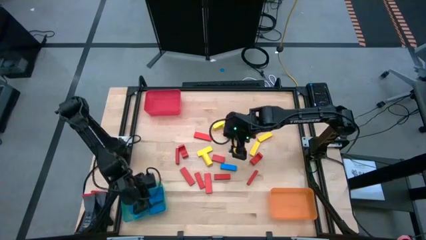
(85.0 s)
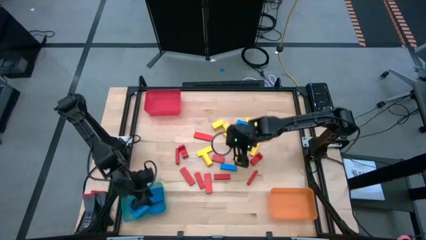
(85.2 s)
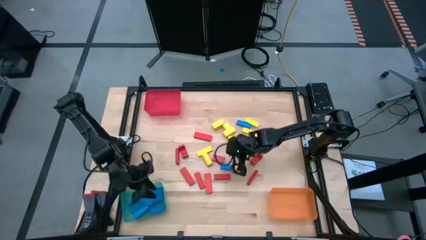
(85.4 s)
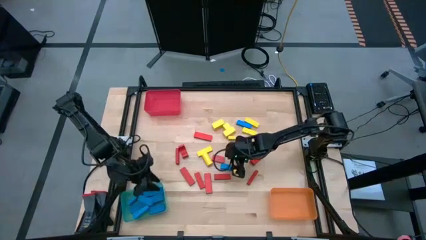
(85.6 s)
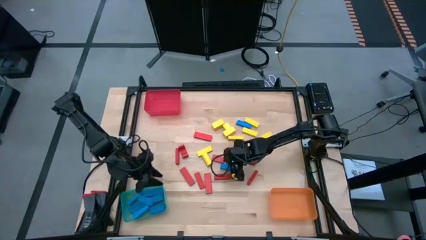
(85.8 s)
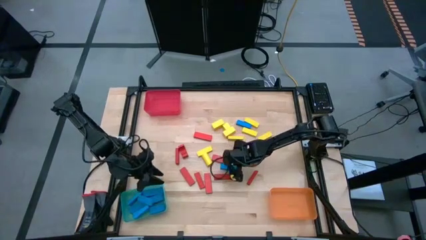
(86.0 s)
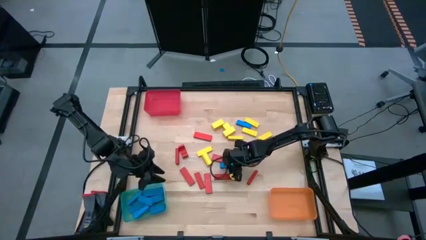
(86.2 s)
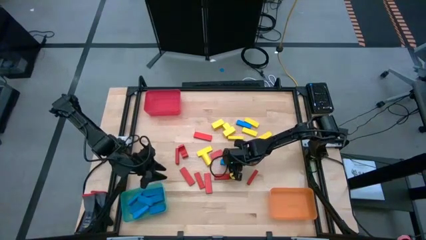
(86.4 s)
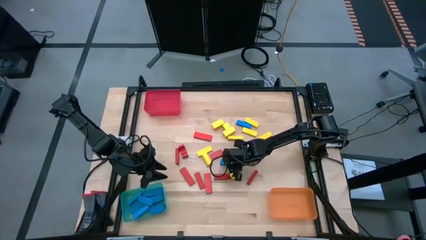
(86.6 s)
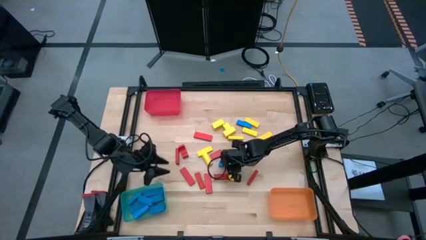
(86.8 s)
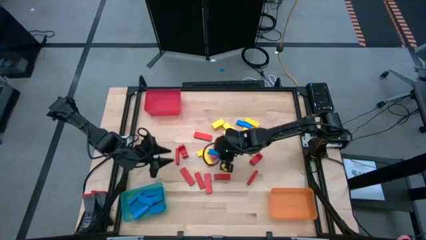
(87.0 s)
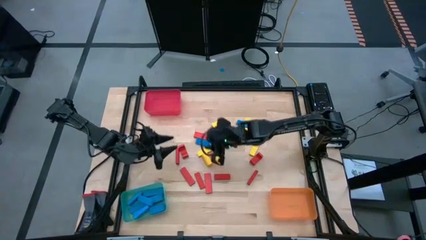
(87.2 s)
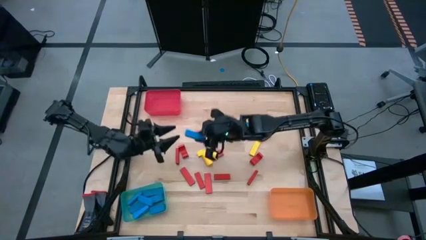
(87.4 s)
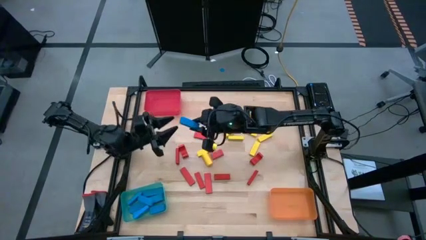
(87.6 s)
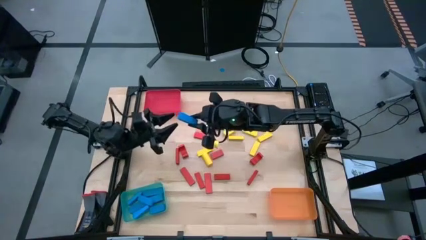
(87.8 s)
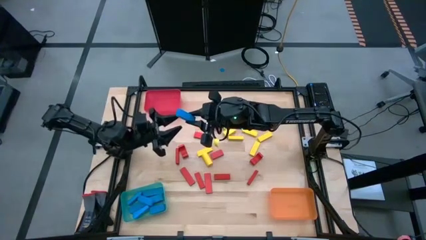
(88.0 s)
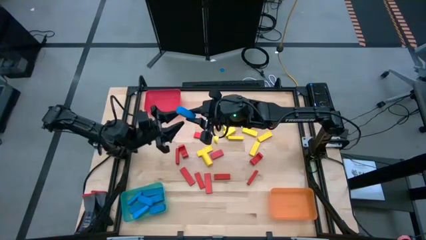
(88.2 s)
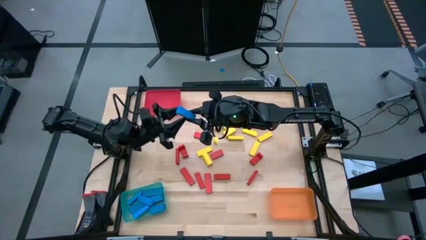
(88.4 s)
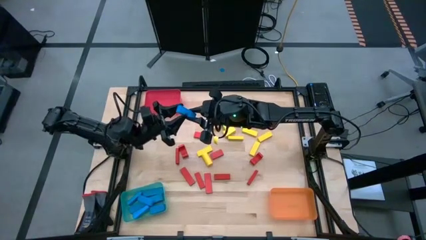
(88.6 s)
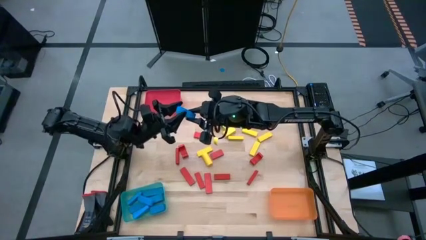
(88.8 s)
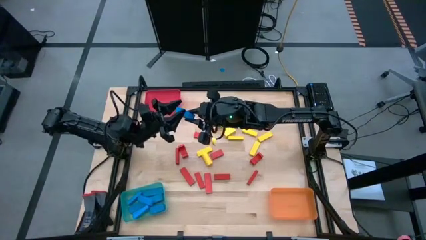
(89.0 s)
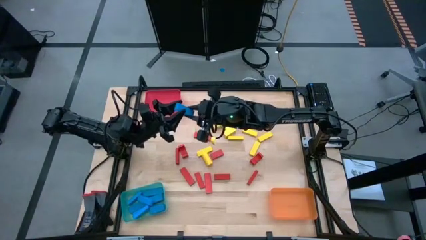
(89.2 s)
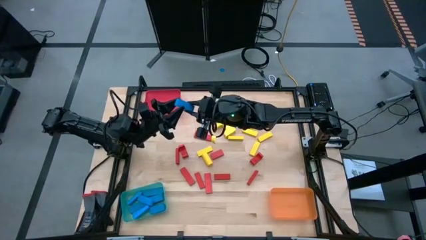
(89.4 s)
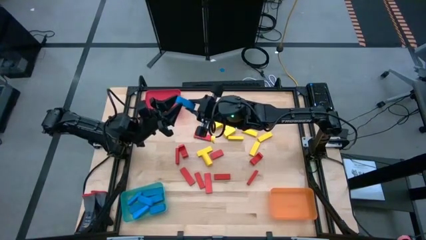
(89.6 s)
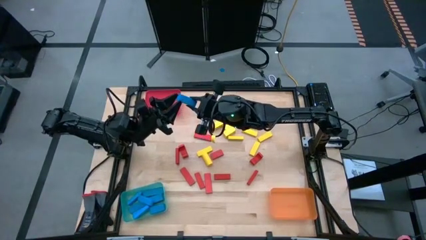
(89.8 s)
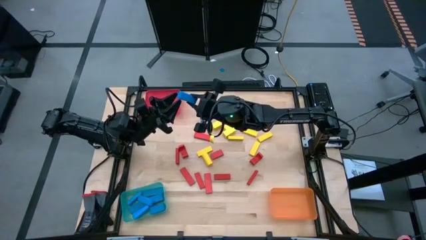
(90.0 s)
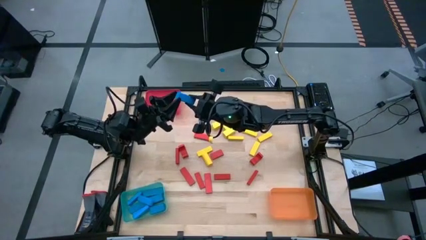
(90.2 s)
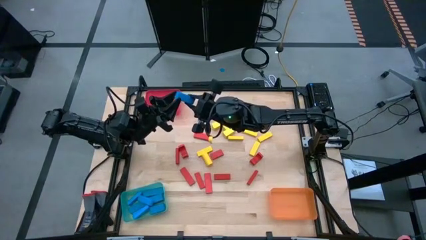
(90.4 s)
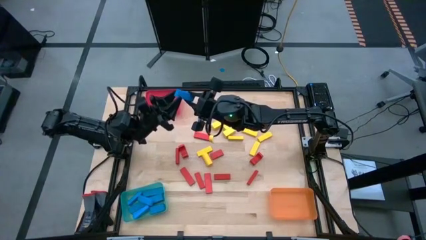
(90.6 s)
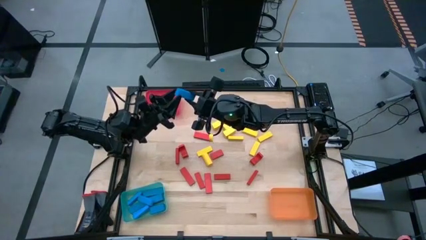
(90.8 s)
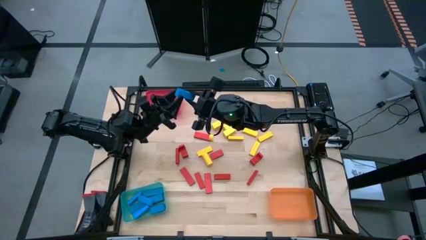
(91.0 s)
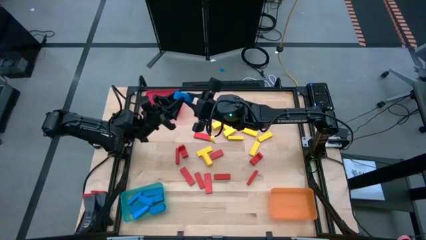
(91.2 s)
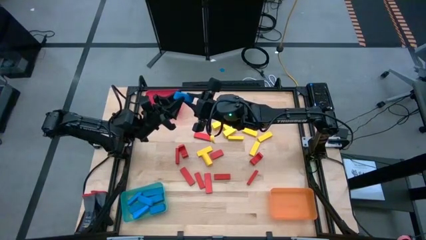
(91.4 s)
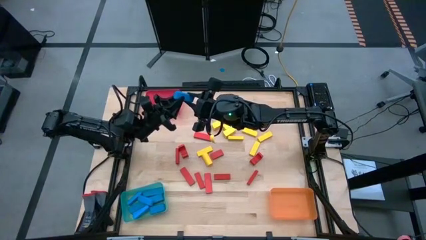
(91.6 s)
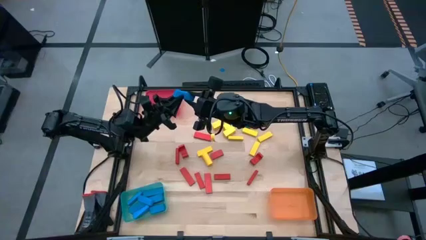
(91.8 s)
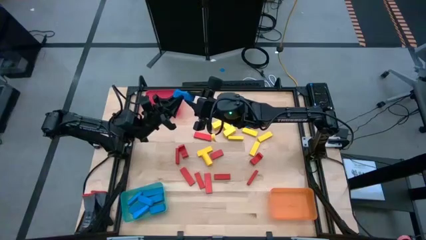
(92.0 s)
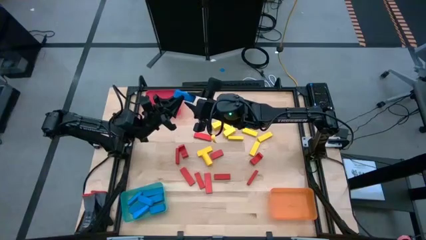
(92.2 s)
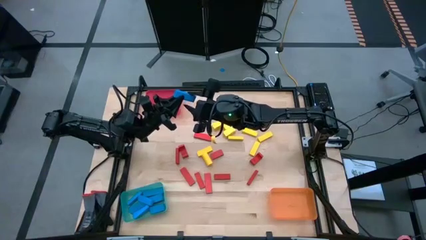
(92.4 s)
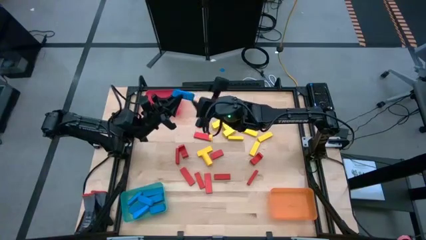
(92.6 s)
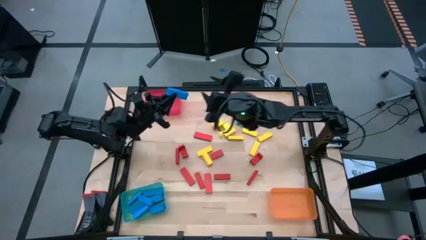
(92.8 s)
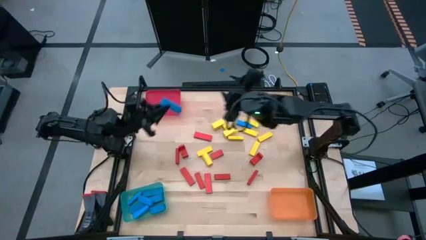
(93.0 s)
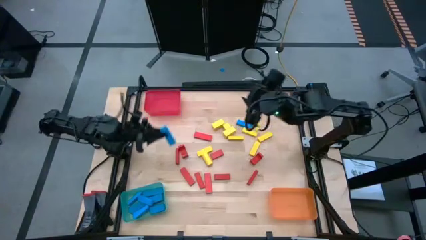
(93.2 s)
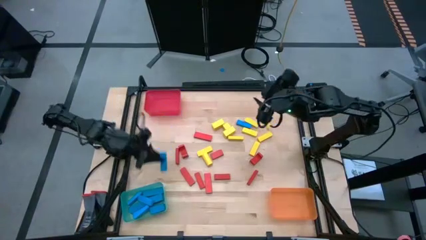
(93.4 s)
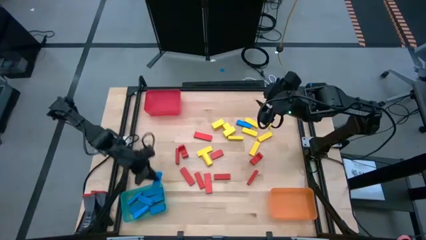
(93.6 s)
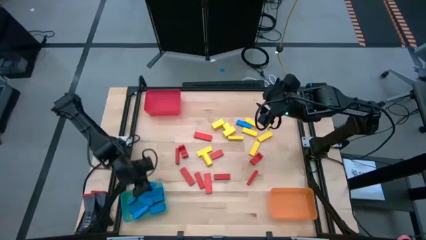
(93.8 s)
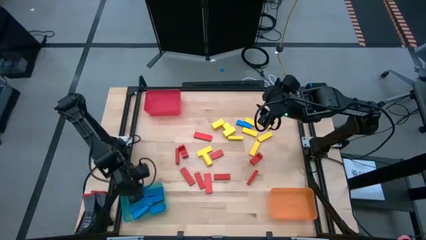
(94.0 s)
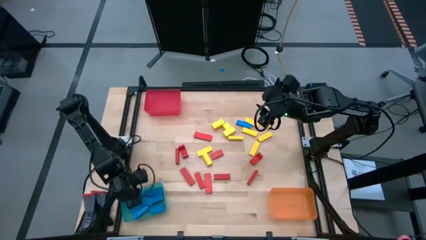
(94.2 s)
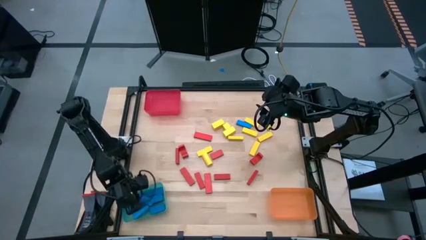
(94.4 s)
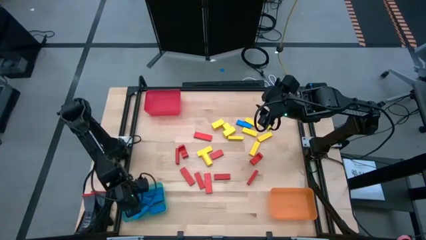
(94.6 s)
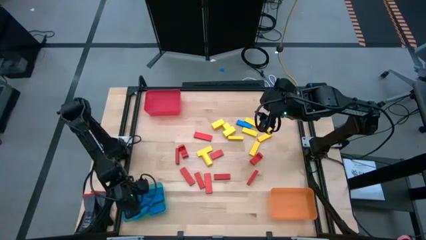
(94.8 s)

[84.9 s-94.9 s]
Task: Sort blocks
Put the blue block into the green bin

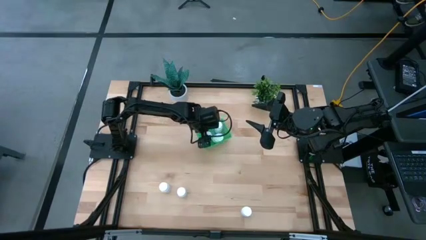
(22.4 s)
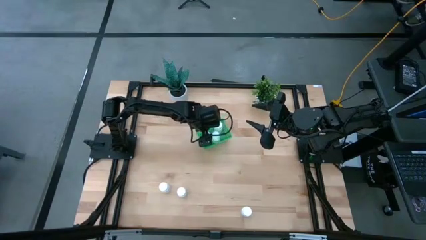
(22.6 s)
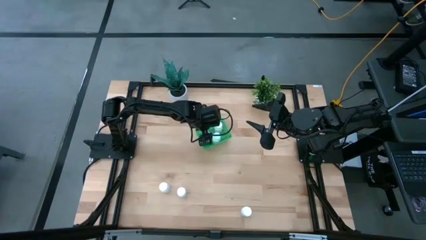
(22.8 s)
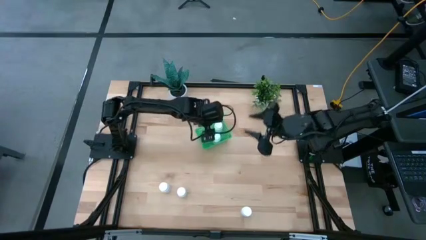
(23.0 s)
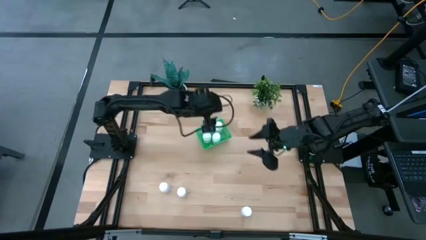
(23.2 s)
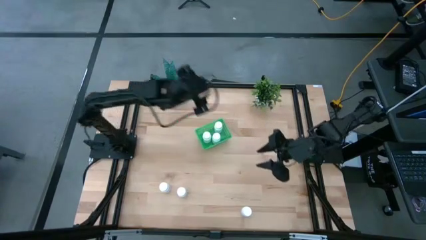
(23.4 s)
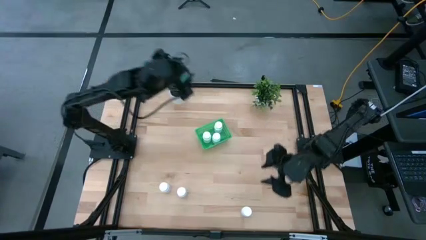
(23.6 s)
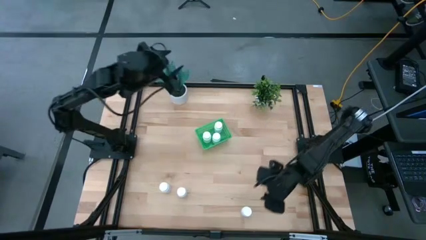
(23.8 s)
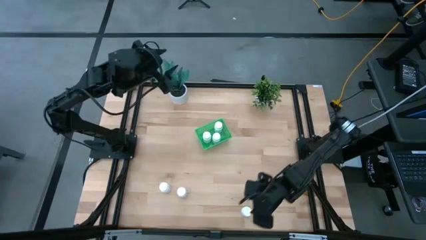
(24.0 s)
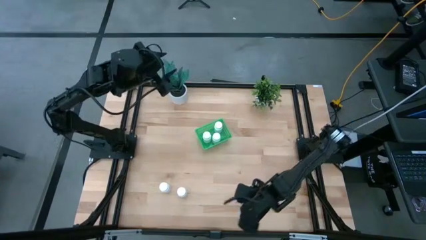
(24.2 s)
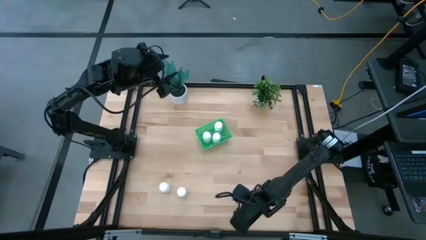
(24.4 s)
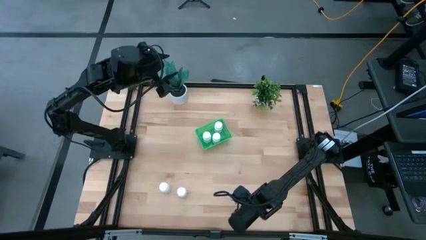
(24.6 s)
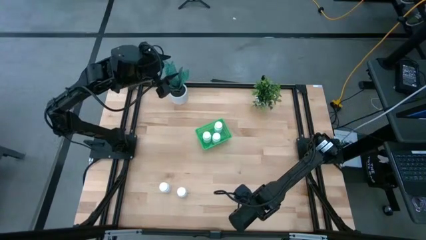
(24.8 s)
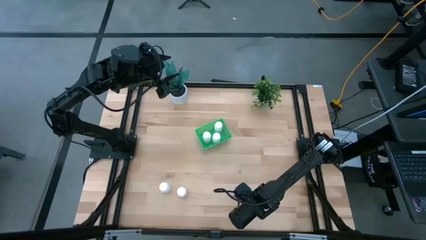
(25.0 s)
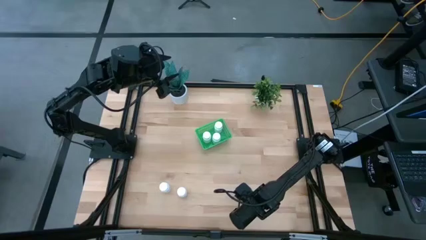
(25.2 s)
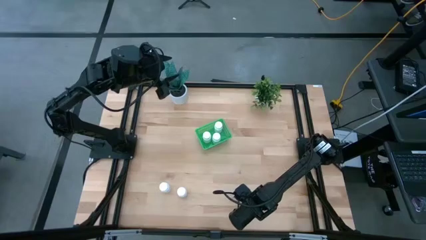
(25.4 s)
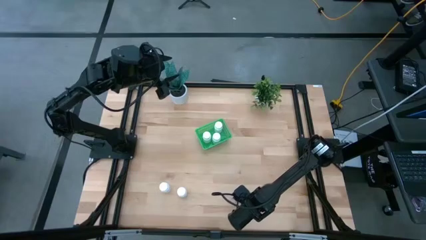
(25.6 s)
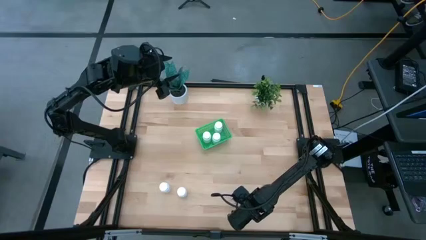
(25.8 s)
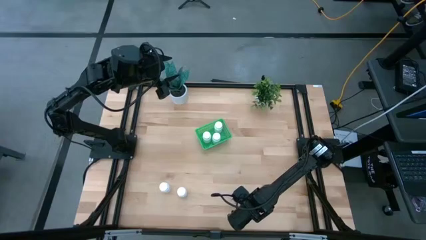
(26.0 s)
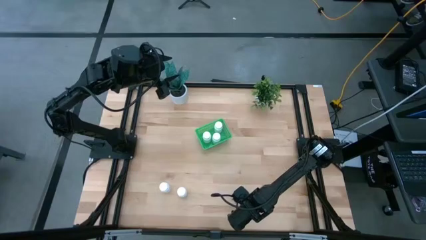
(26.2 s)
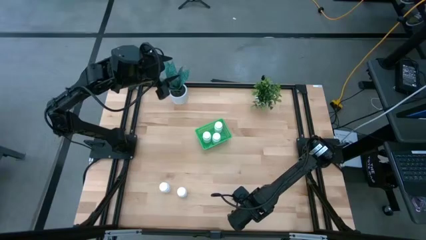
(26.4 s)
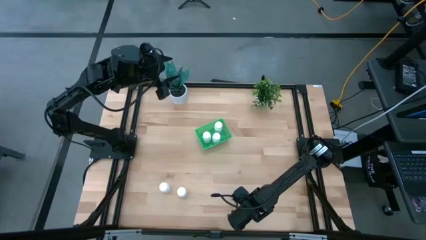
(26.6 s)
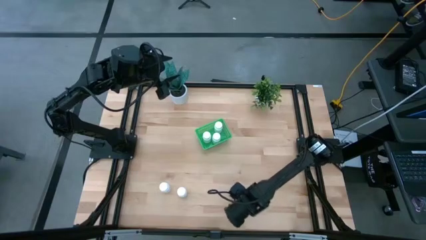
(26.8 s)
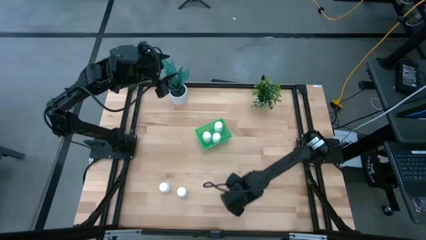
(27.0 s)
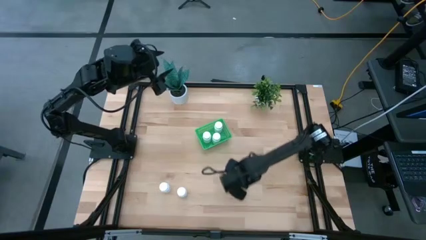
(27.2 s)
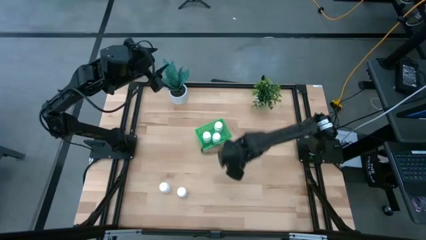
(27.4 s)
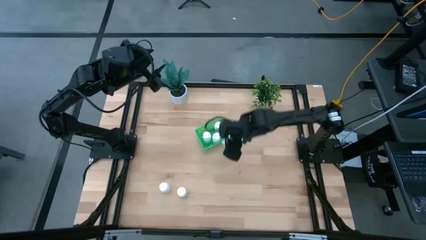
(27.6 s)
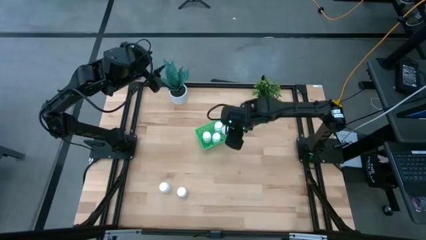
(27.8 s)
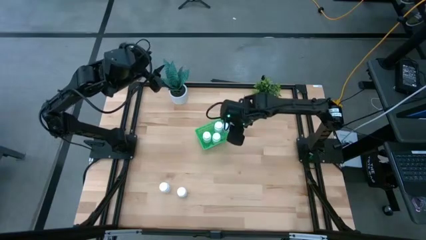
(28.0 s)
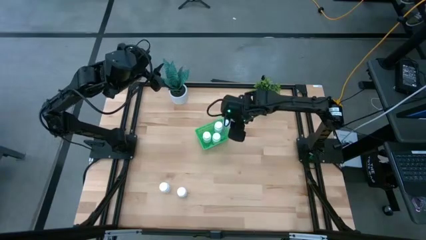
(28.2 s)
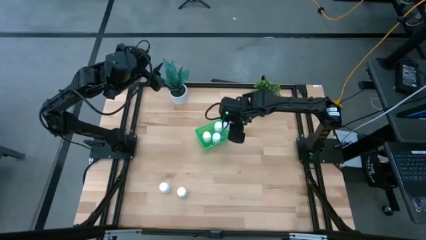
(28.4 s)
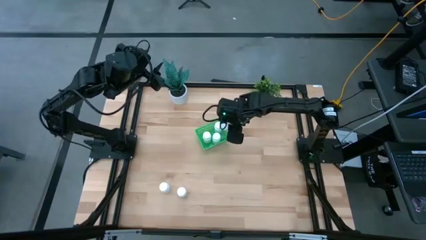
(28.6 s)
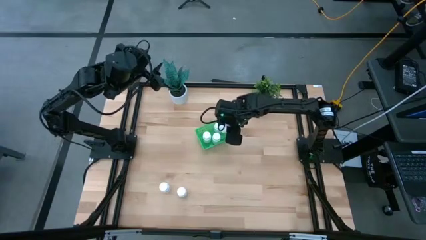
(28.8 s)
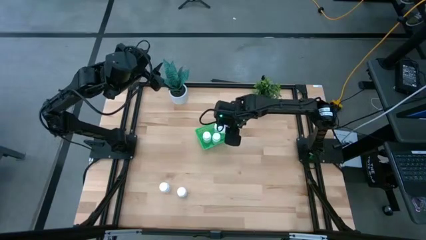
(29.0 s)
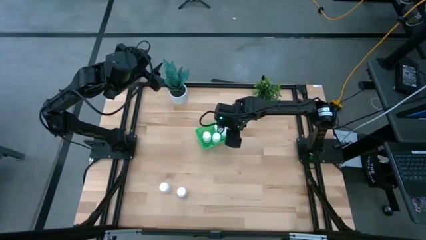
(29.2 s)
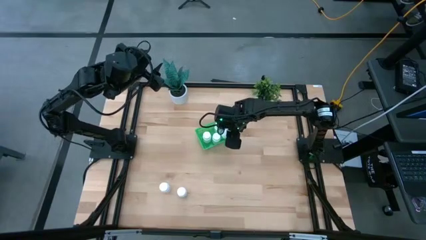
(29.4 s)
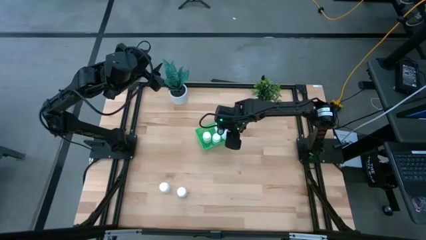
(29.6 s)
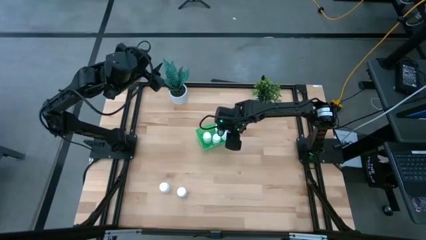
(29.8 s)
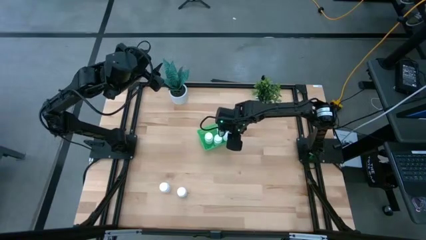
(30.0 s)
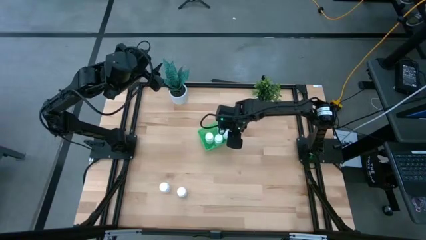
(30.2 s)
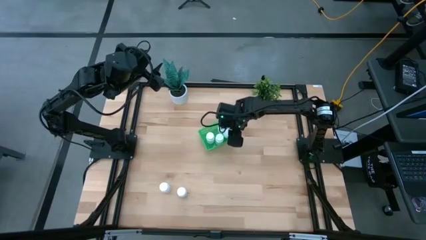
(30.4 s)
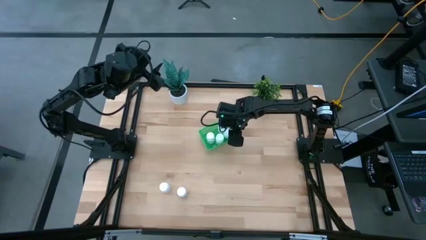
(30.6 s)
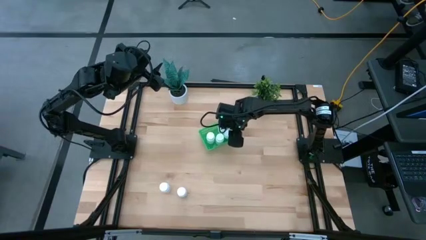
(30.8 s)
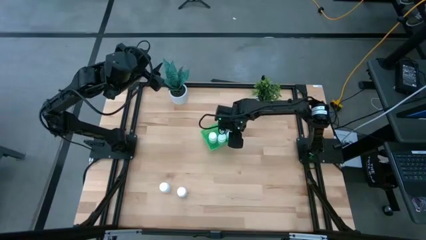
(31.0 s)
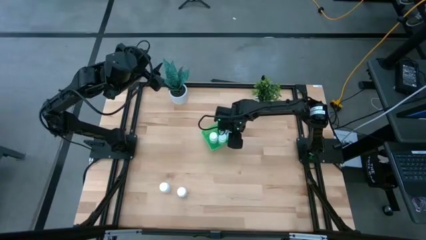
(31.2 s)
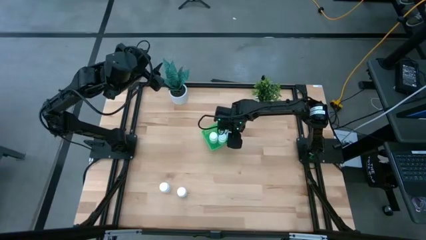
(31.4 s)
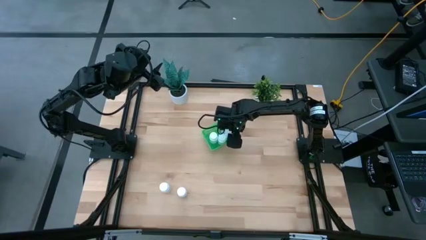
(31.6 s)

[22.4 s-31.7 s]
Task: Pick and place pill bottles into a basket
Put the white pill bottle into the green basket
